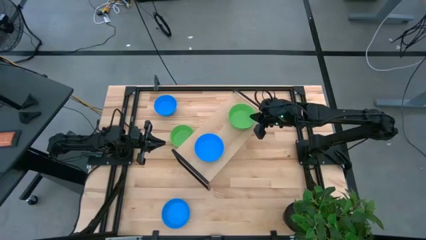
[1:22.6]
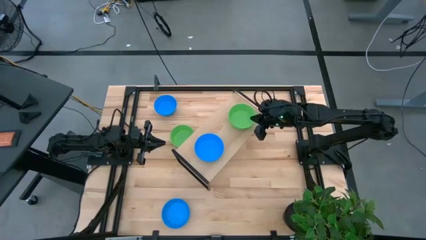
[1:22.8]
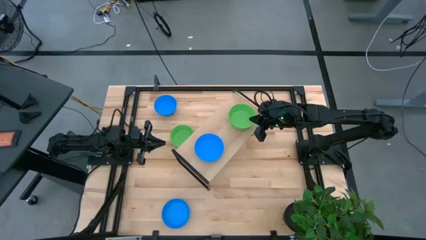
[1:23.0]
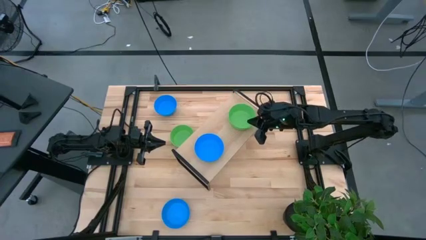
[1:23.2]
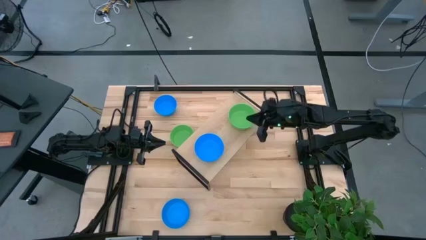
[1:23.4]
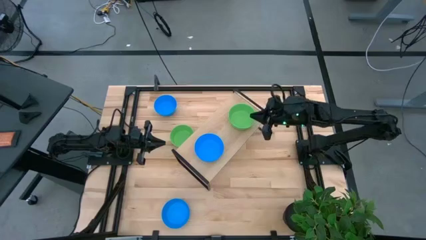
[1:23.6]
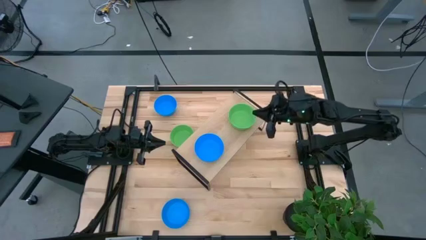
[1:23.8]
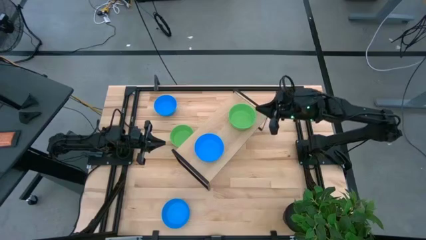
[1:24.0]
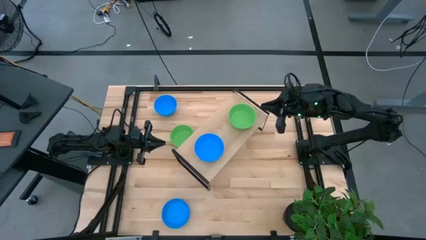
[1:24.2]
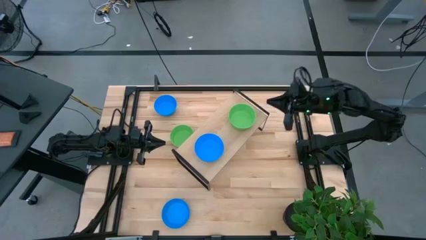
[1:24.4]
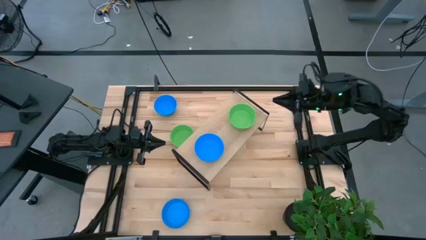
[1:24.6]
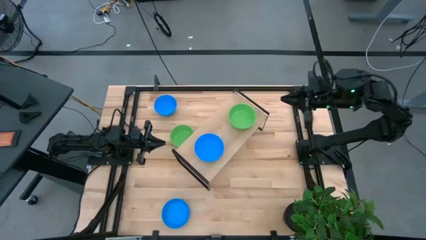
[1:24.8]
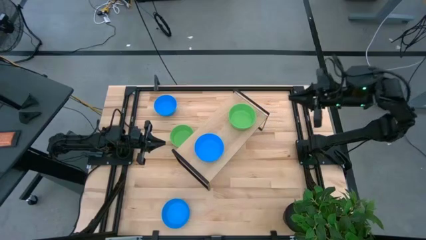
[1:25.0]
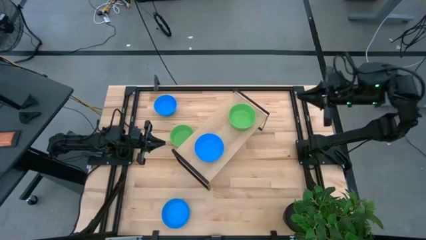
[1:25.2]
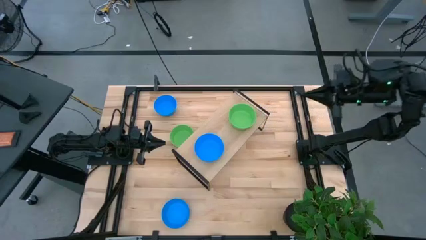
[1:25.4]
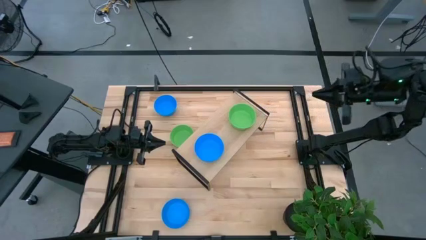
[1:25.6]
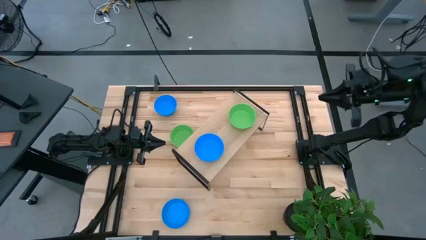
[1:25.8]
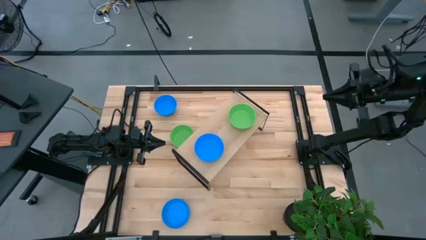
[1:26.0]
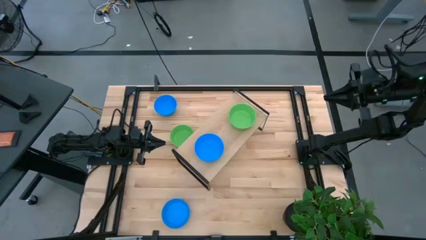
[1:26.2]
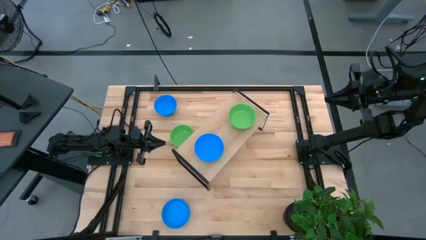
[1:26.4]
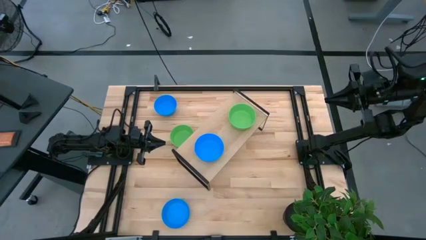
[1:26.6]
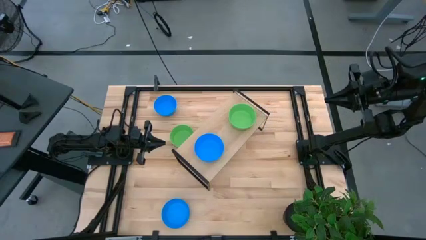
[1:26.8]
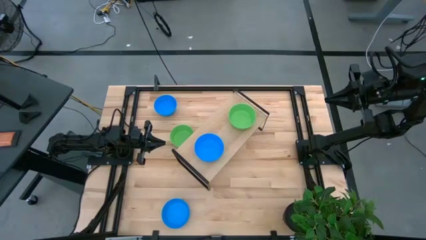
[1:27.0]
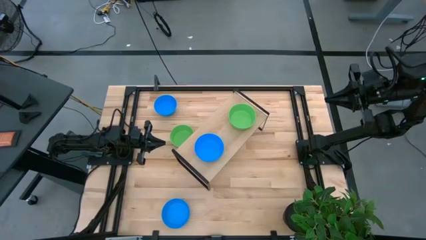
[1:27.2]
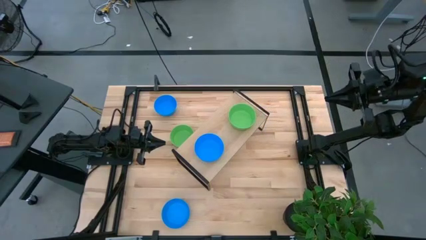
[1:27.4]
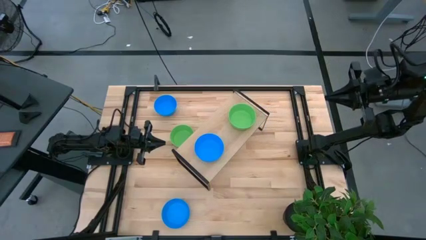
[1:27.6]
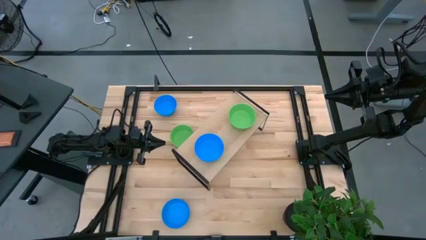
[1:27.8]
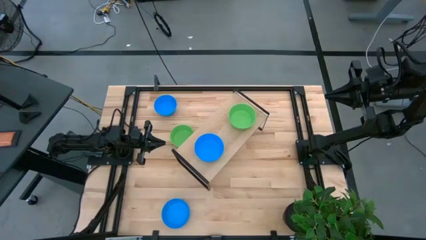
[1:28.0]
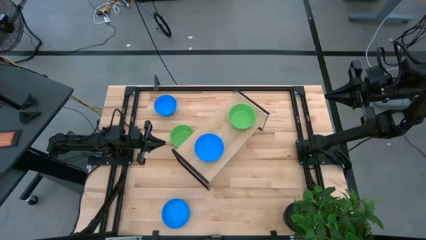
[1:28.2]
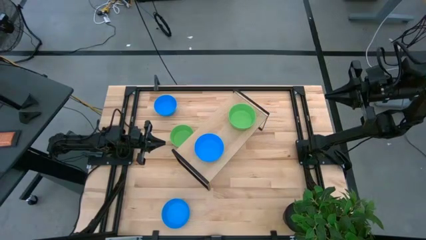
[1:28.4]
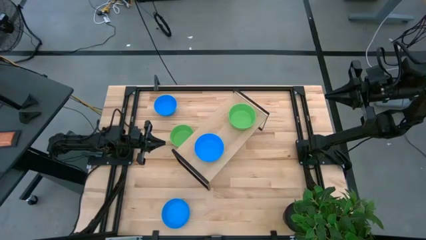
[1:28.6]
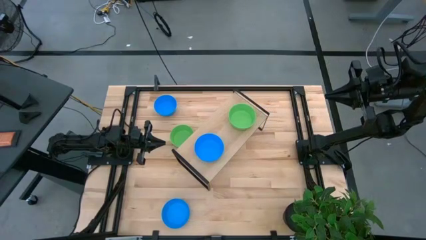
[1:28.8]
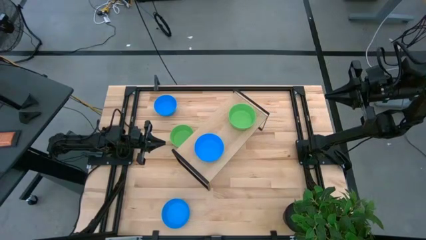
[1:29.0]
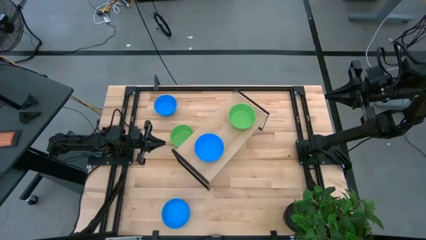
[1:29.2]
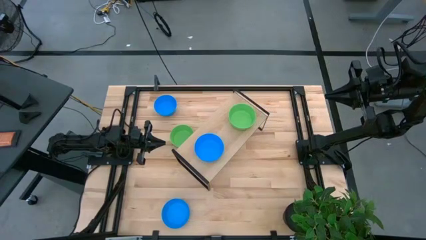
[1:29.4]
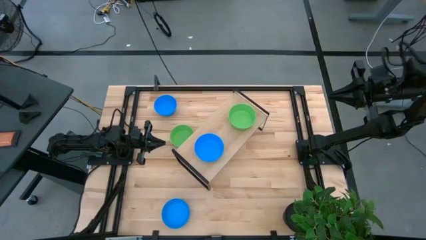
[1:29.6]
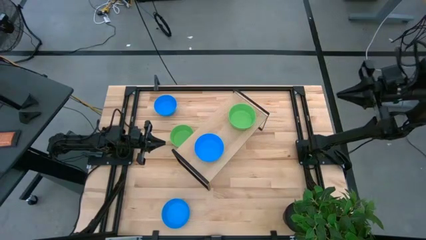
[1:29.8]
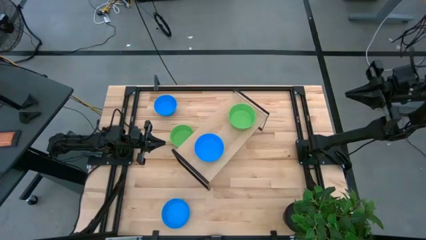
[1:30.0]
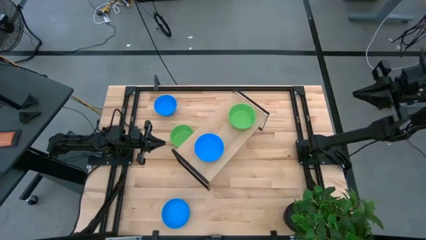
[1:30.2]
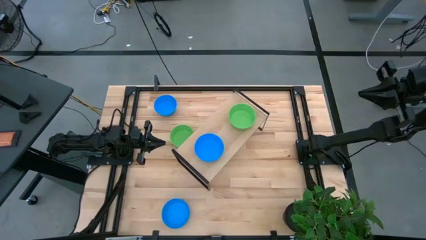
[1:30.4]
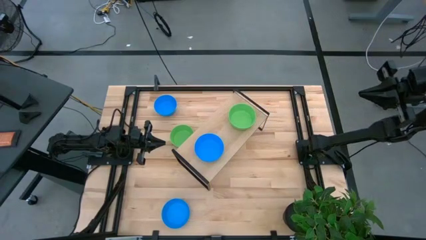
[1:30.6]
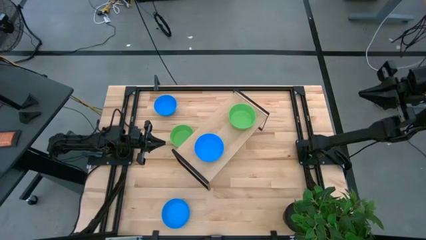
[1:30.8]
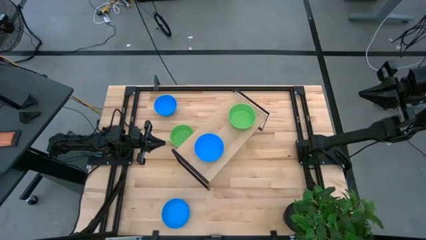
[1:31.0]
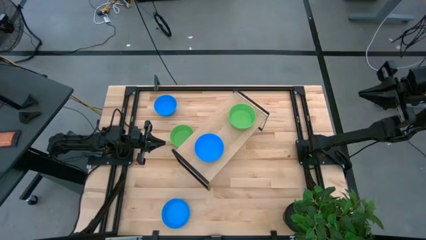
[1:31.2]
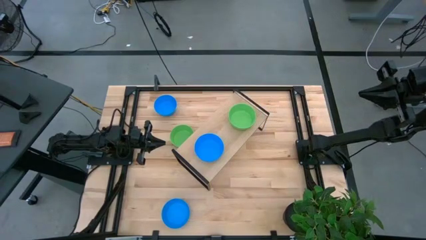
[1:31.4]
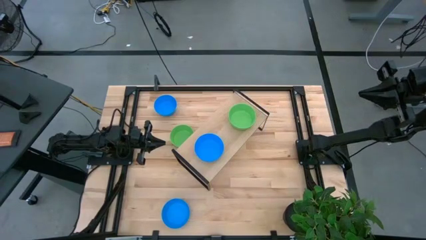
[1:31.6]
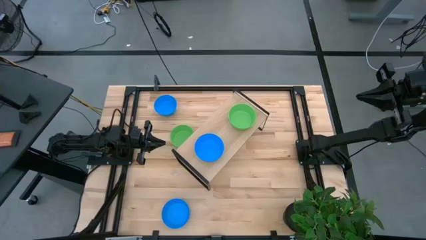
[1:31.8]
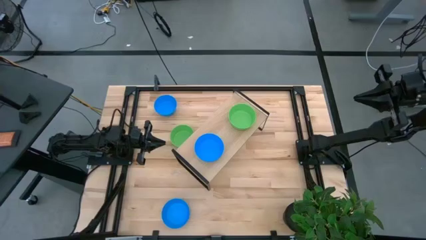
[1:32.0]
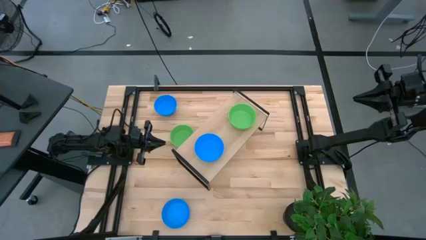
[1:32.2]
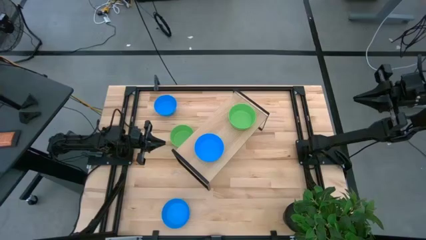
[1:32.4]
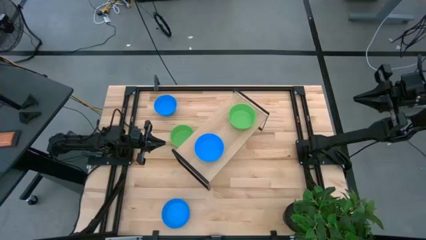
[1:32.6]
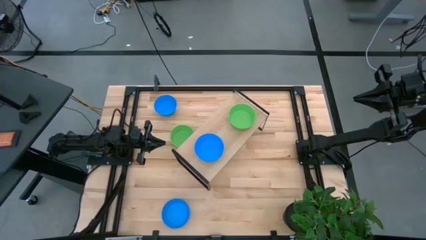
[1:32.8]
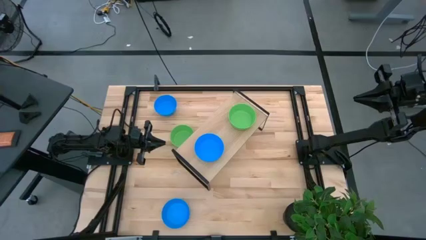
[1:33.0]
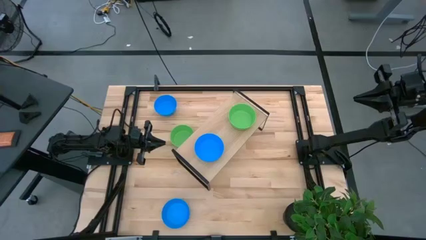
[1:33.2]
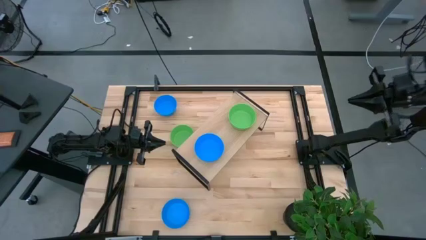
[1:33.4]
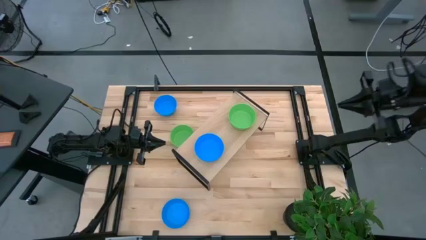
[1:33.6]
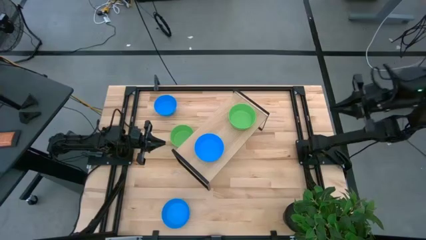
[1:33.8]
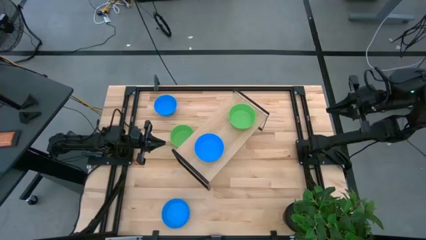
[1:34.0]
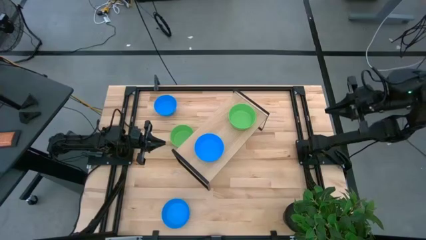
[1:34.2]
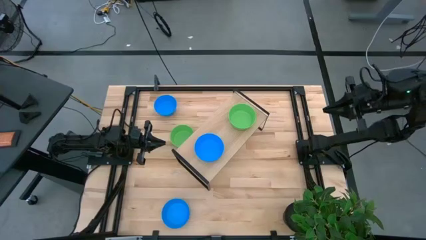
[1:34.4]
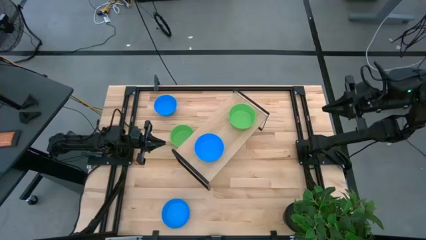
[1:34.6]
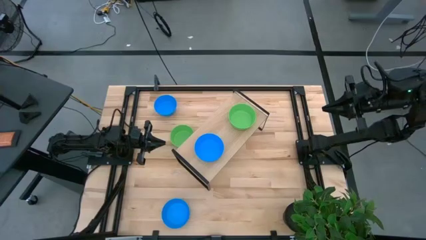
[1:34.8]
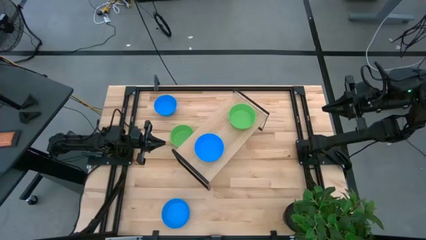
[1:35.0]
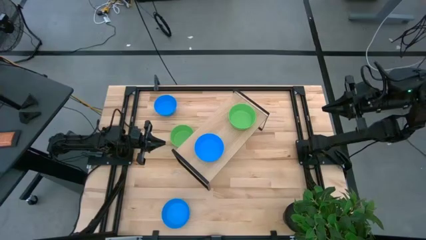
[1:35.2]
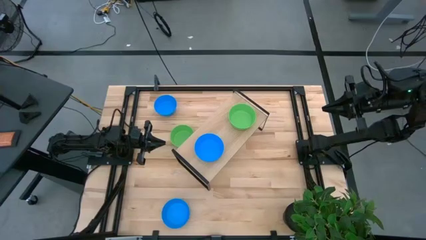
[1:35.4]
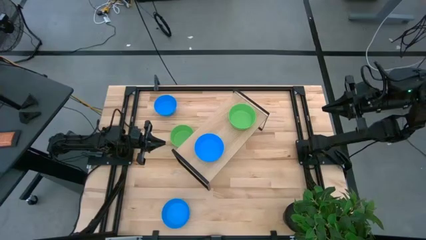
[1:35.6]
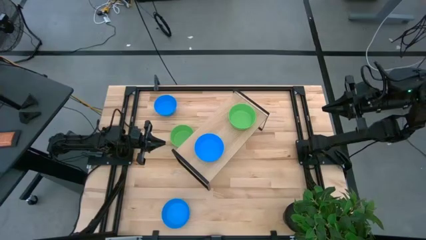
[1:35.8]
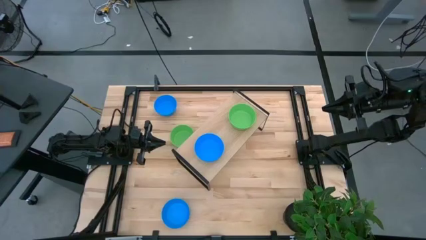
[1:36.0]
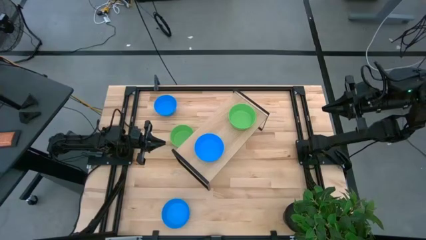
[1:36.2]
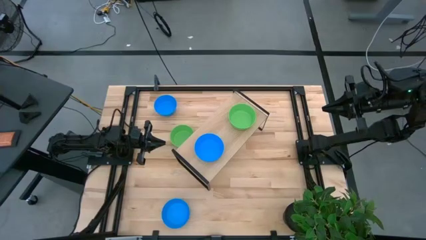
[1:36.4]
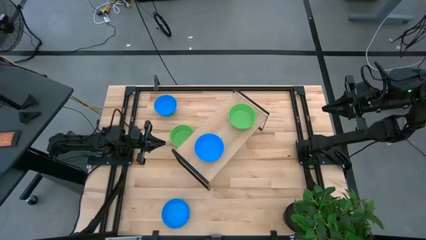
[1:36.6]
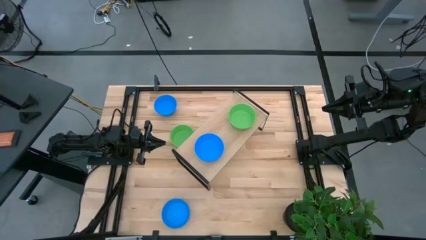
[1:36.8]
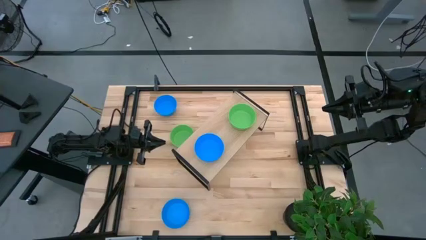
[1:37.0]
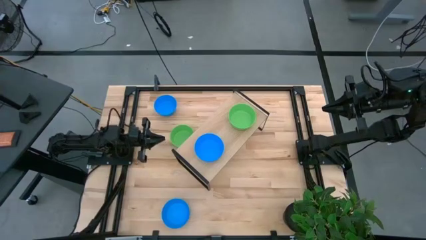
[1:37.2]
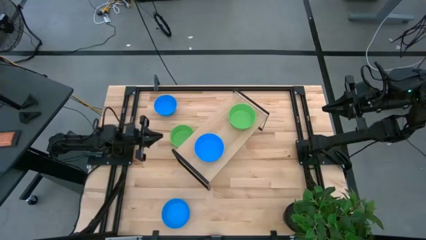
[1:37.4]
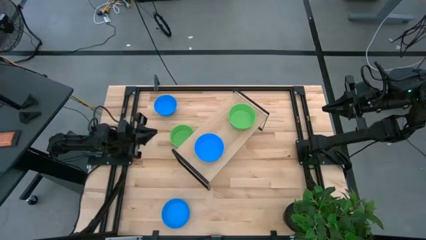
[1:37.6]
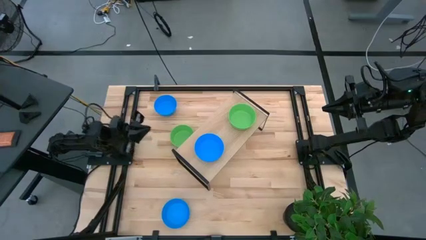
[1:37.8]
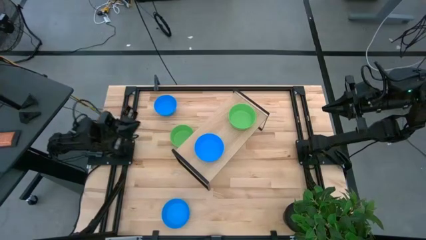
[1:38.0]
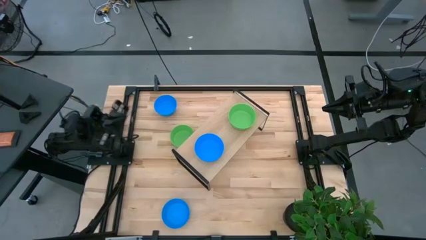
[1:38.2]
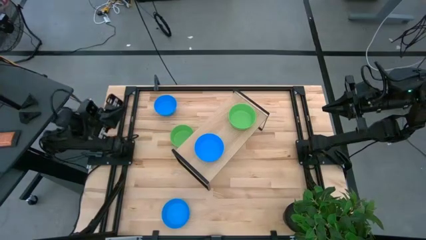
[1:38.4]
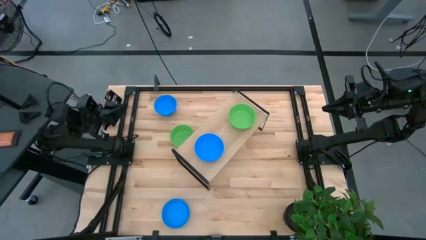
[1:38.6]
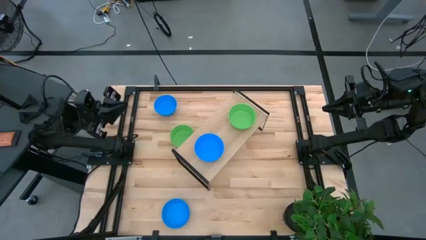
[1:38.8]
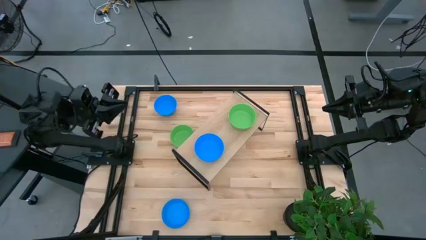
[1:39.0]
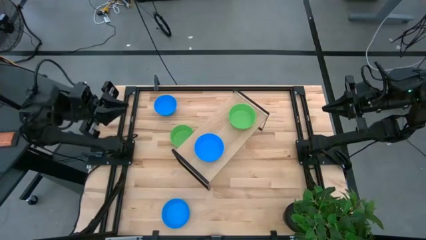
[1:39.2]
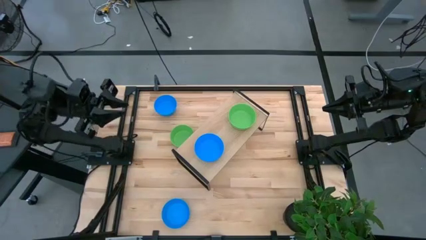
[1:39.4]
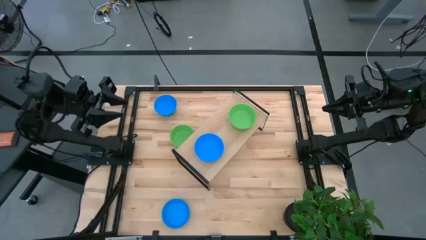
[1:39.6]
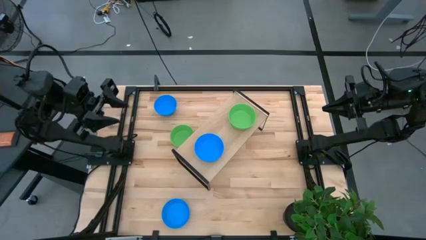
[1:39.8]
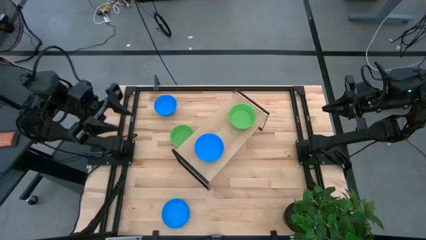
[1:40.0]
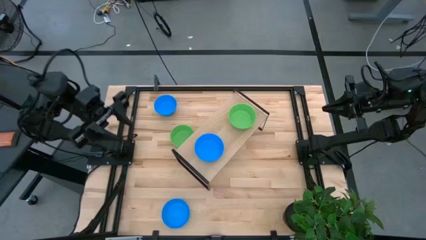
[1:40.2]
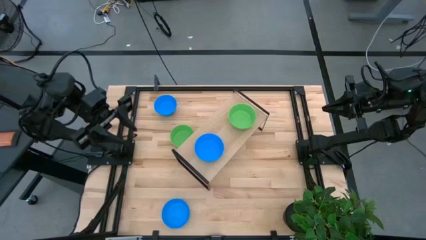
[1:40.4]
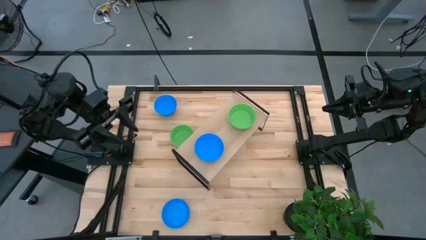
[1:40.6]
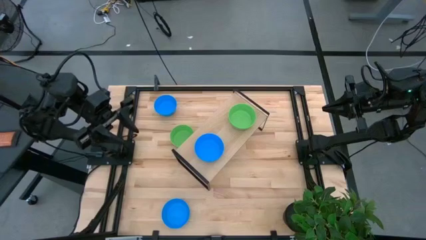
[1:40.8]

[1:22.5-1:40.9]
Task: Pick & Place Mini bowls
Stack the bottom blue bowl on top of the blue bowl on the shelf
